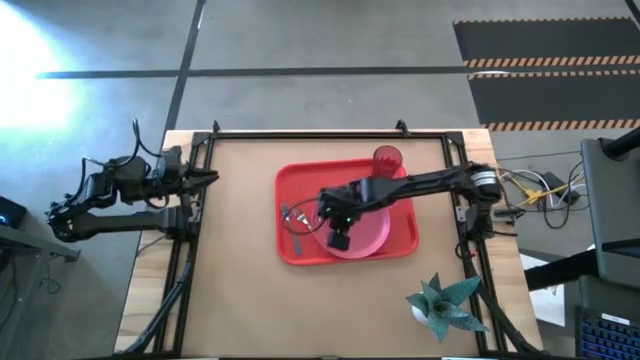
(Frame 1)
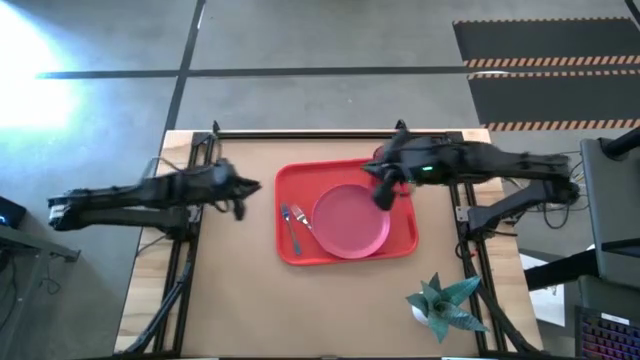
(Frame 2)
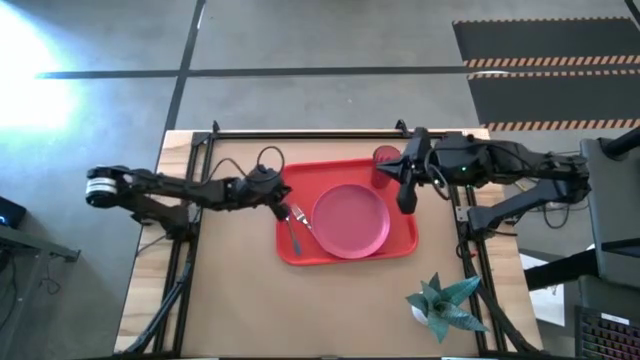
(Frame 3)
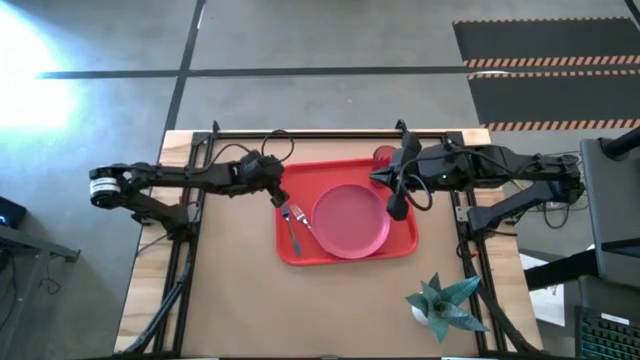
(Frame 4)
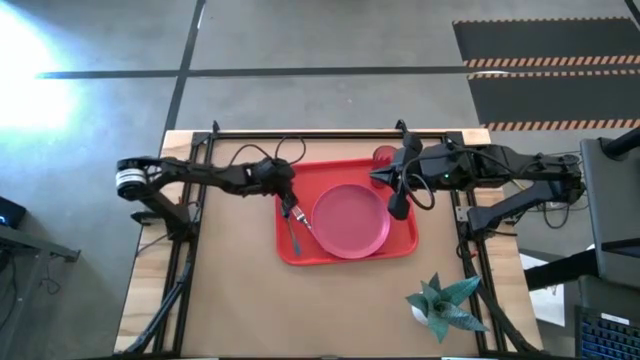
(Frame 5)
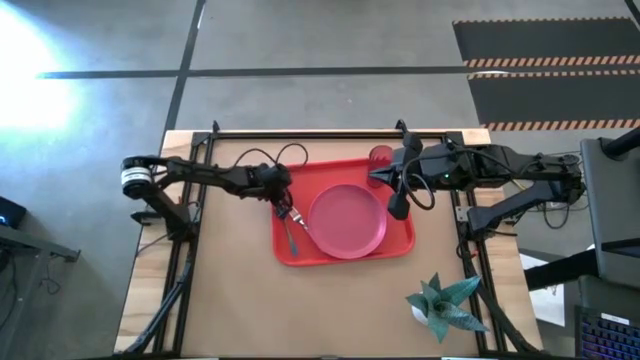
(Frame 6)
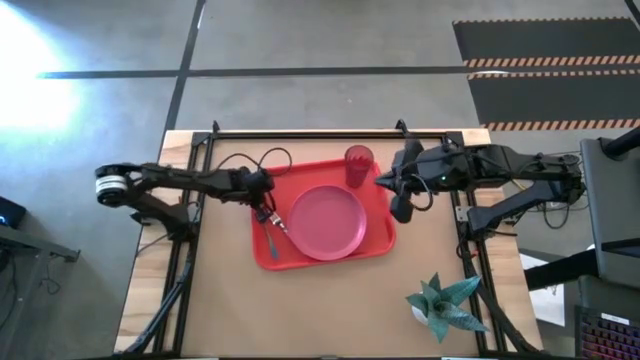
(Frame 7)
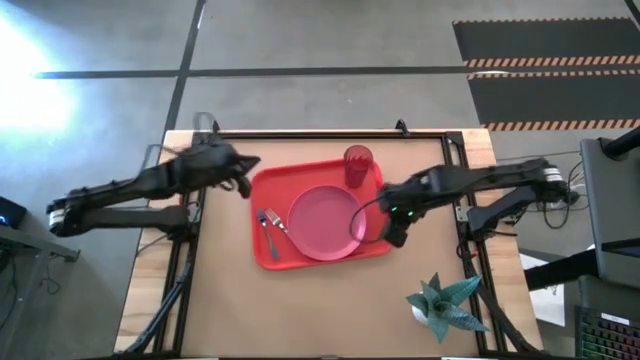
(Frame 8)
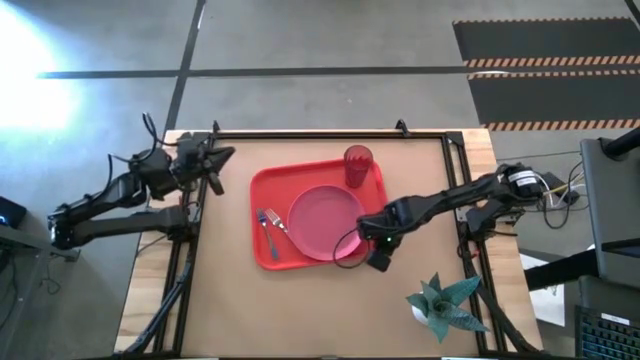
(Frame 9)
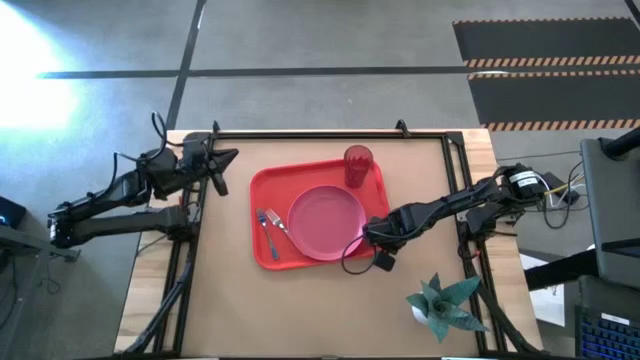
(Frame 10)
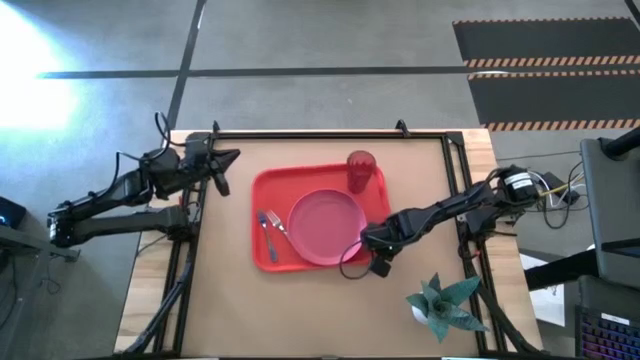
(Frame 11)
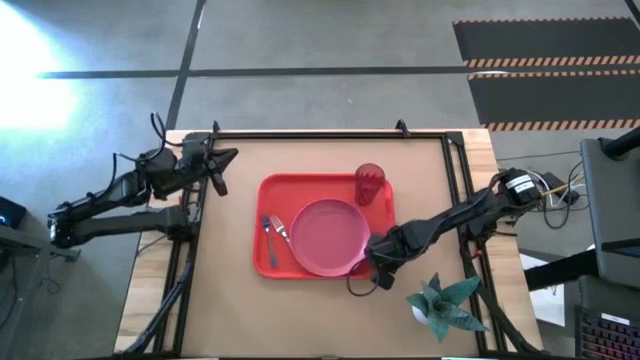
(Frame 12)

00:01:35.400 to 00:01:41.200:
Task: Pick and place plate/cup/fork/spoon on tray
Adjust the red tray

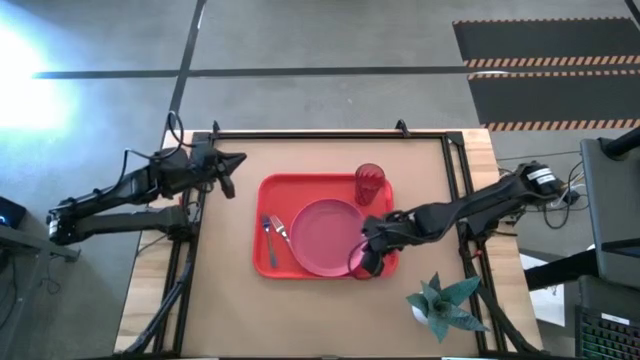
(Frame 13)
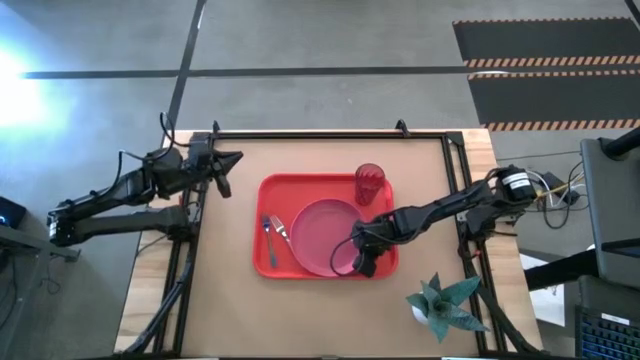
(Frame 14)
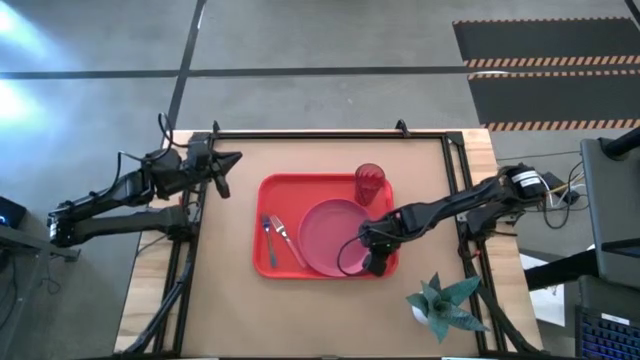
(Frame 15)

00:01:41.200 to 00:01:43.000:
Adjust the pink plate on the red tray

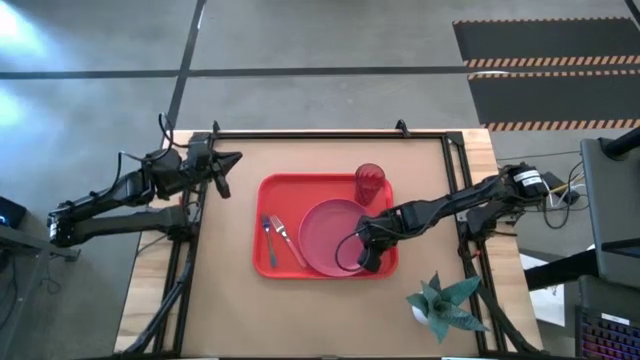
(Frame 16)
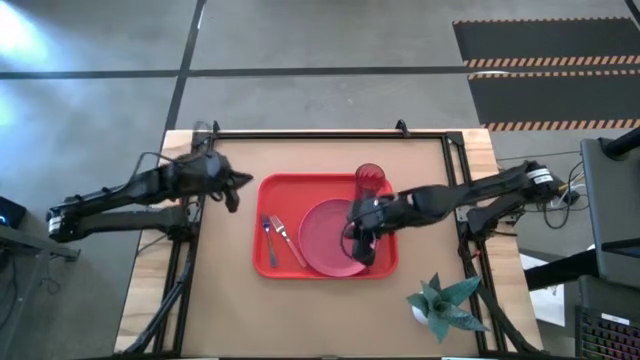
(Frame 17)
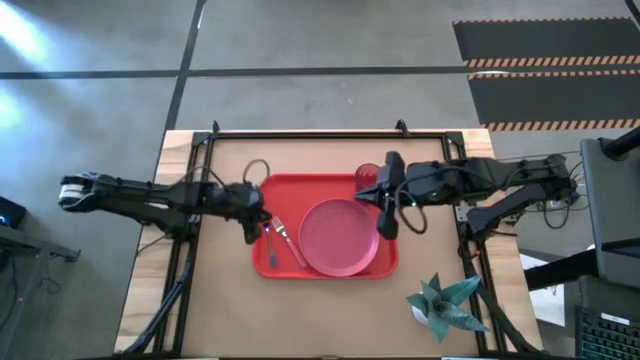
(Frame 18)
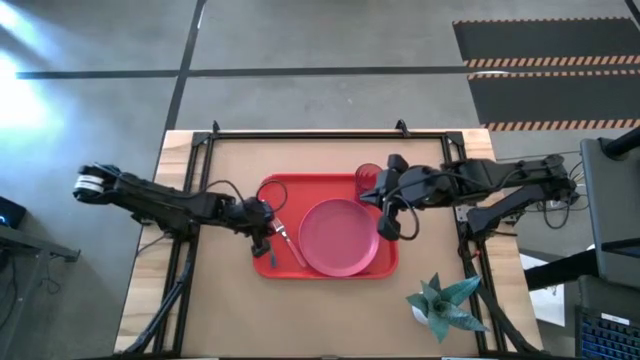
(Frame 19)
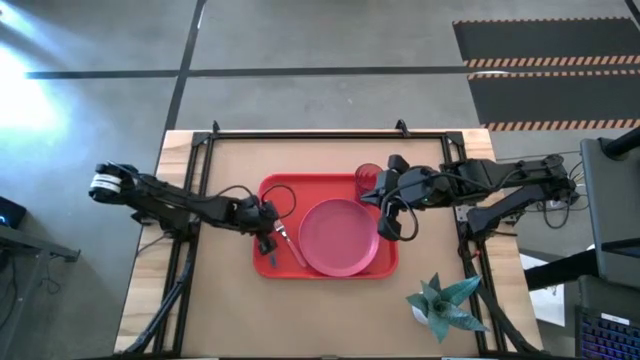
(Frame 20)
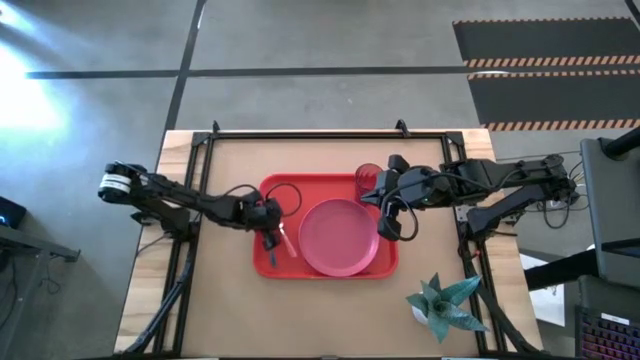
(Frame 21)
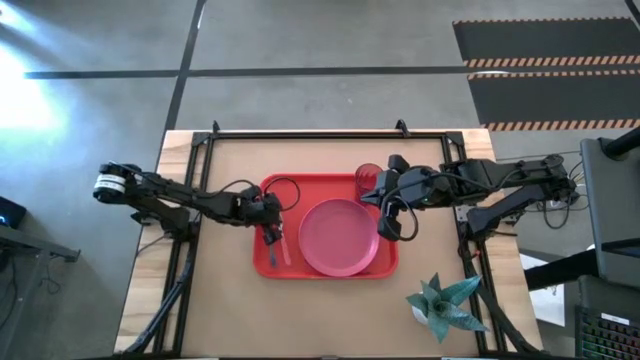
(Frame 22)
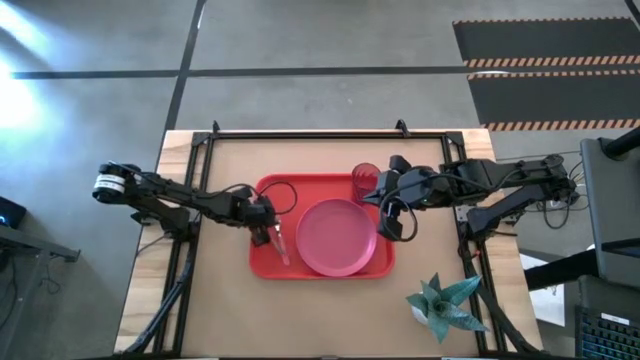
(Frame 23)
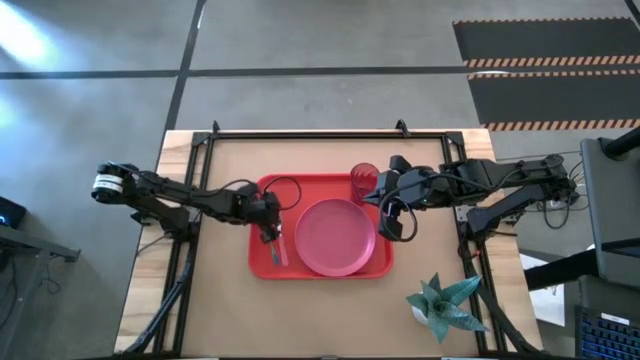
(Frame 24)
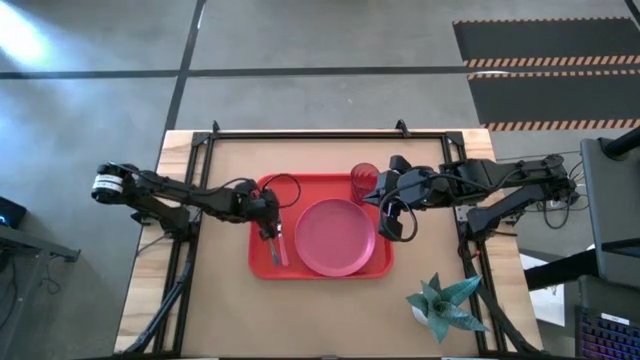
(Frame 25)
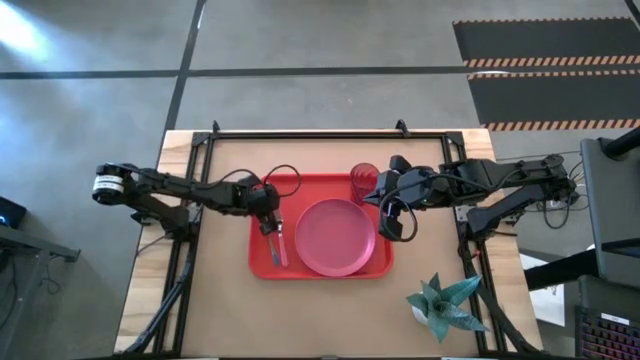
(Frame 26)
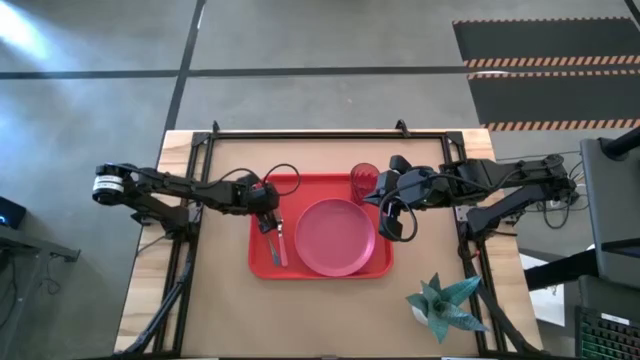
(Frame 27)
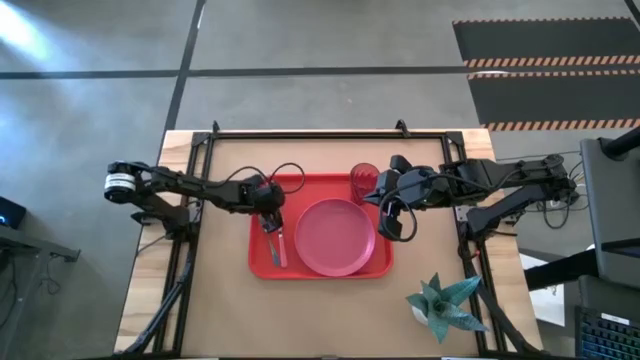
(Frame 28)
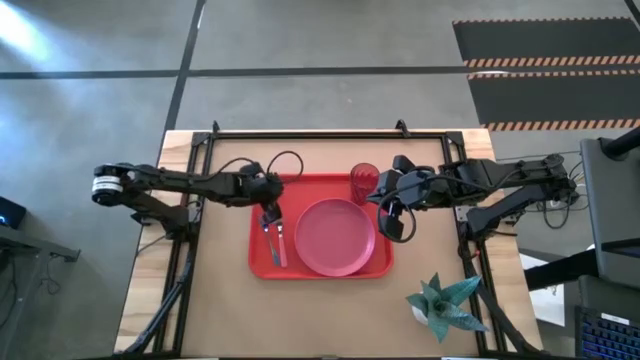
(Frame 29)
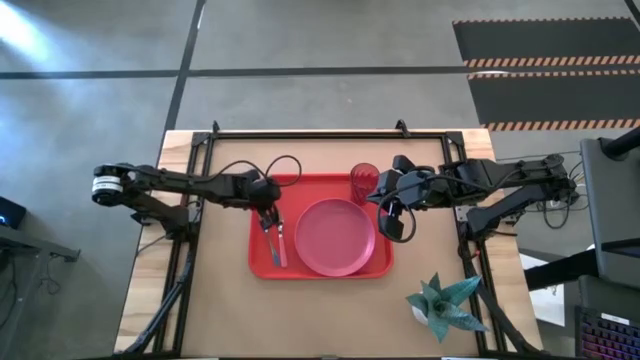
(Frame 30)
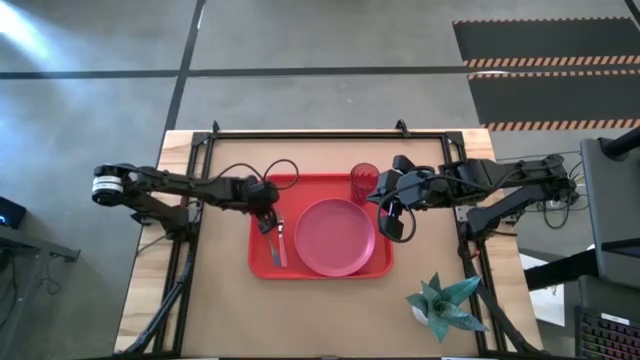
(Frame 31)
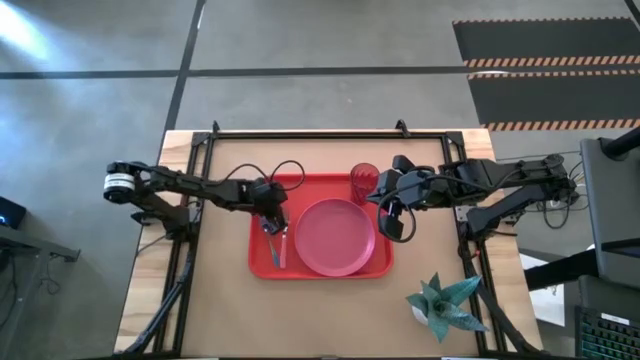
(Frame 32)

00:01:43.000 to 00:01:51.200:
Adjust the pink fork on the red tray

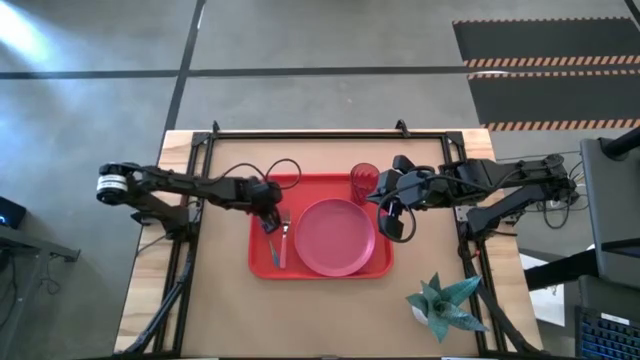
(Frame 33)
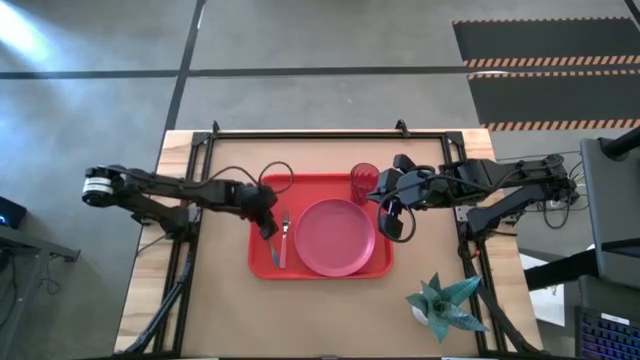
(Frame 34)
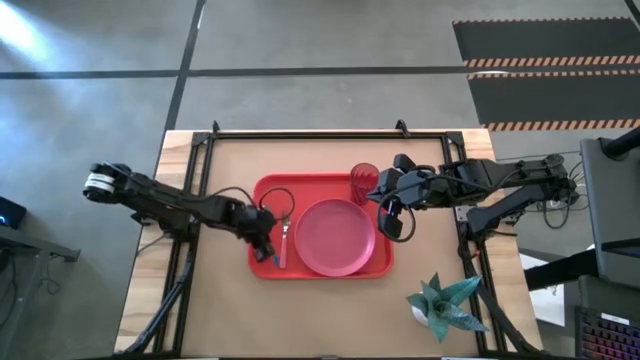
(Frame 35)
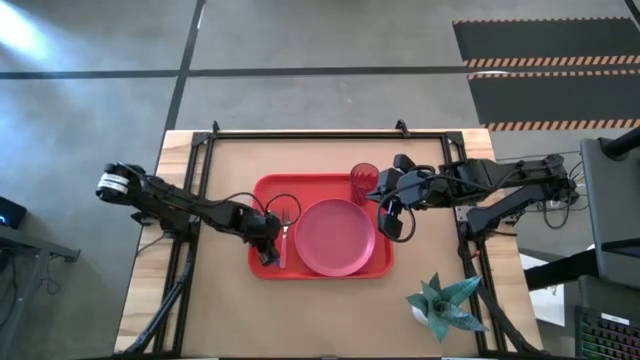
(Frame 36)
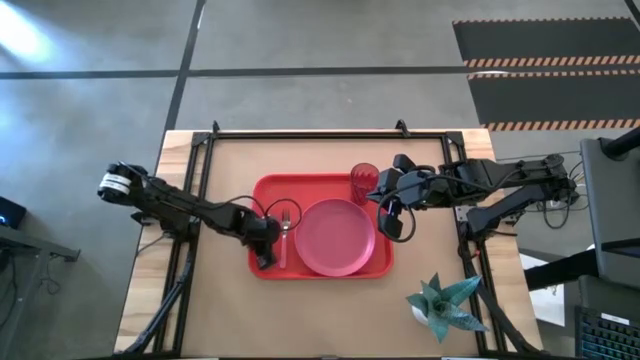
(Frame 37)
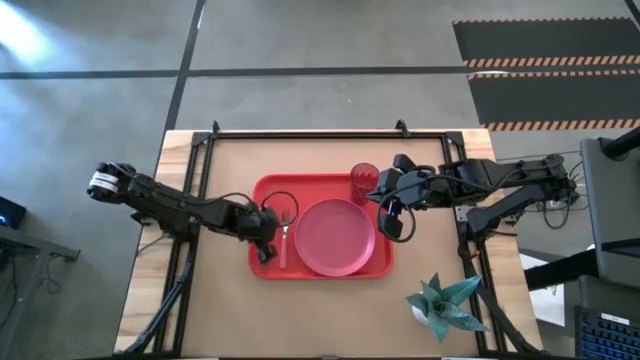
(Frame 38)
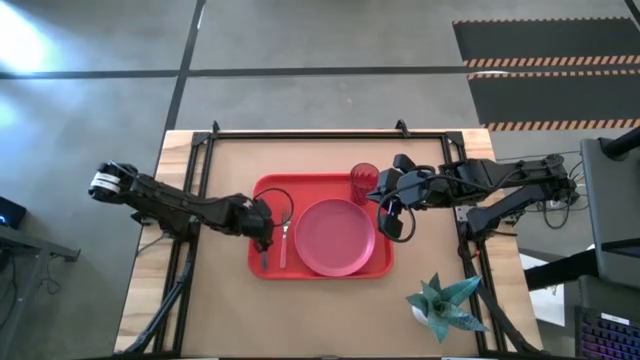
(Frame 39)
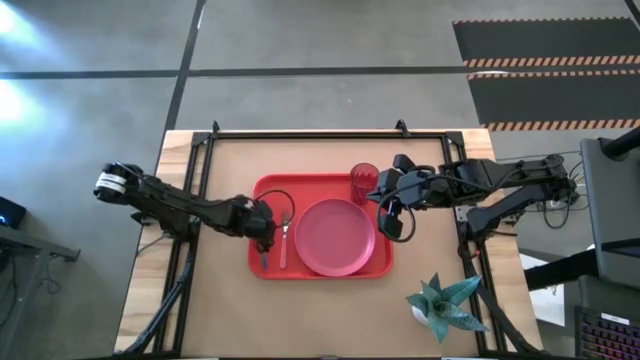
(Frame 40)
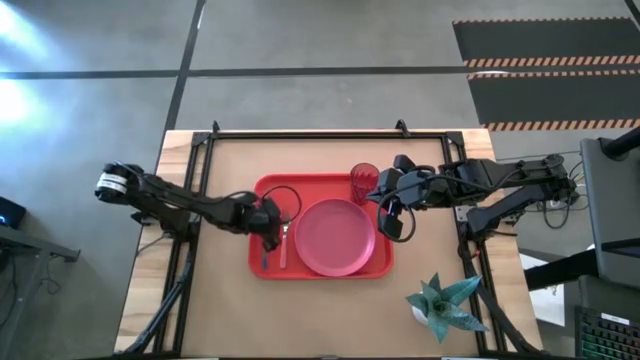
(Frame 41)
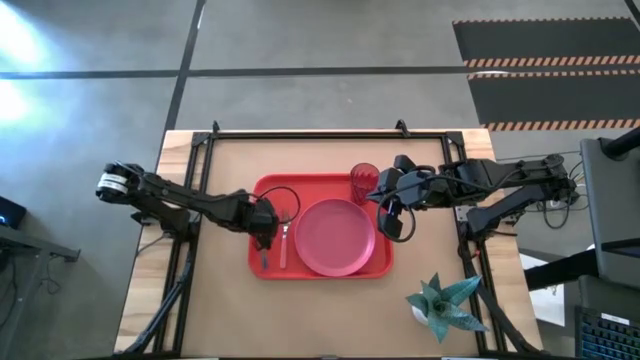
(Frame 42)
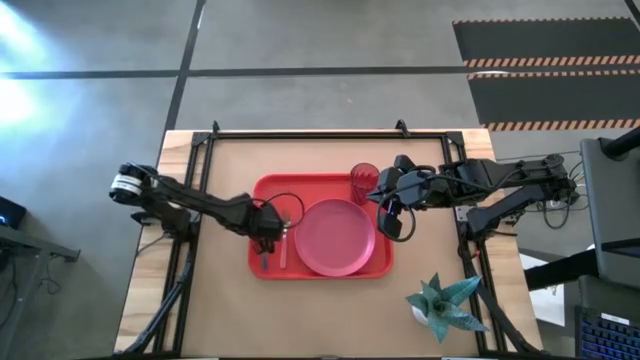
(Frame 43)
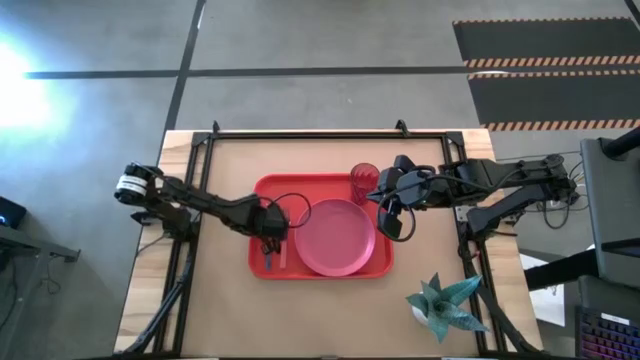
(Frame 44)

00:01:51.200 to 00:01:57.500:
Adjust the blue fork on the red tray
